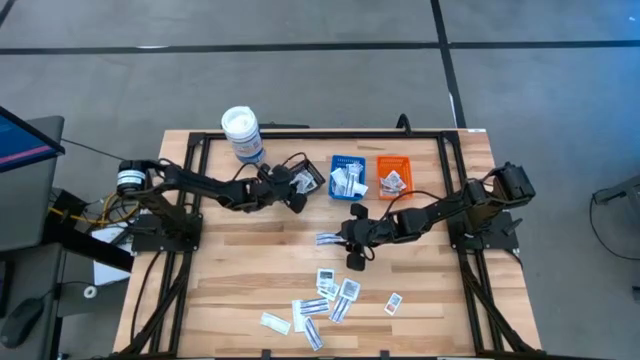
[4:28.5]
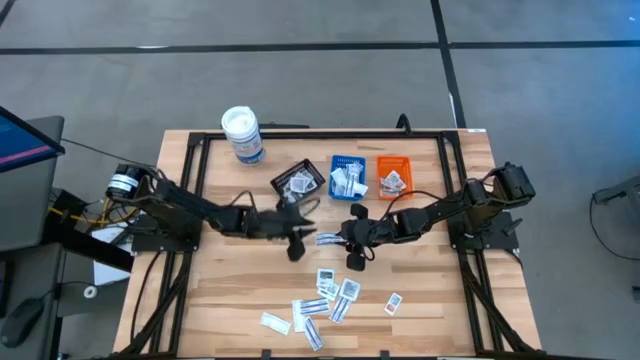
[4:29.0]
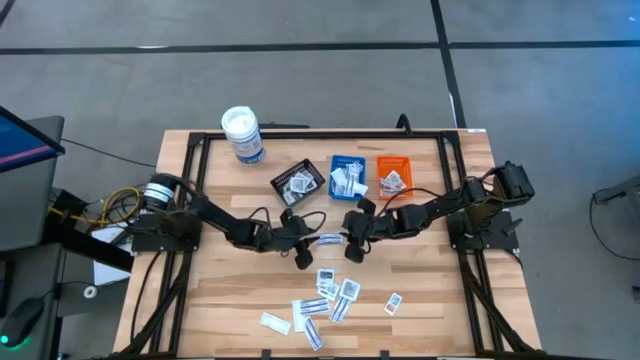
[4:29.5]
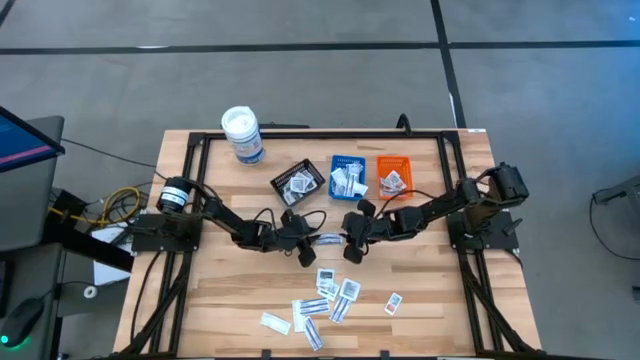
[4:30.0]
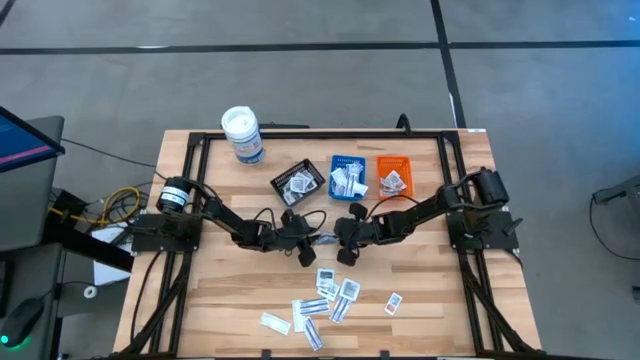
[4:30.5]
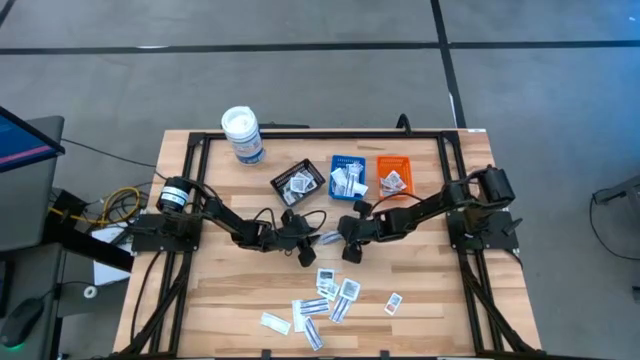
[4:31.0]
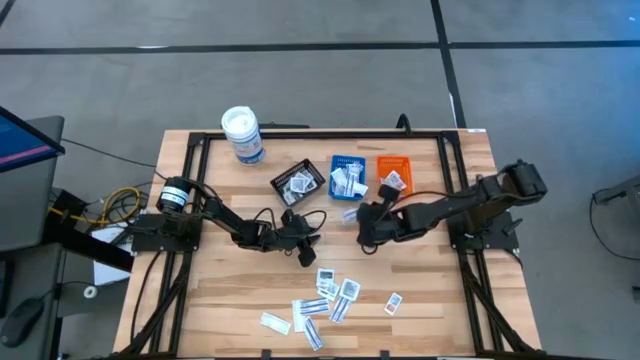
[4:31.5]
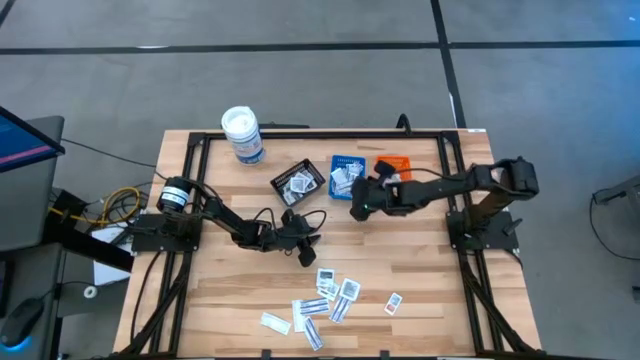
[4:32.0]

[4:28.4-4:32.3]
Task: Pick & Place First Aid Supplies
Put the blue bandage into the blue bin

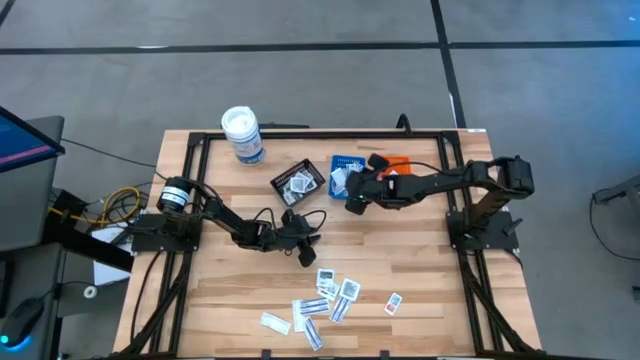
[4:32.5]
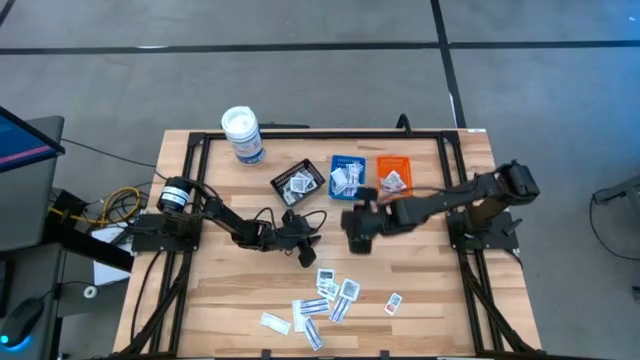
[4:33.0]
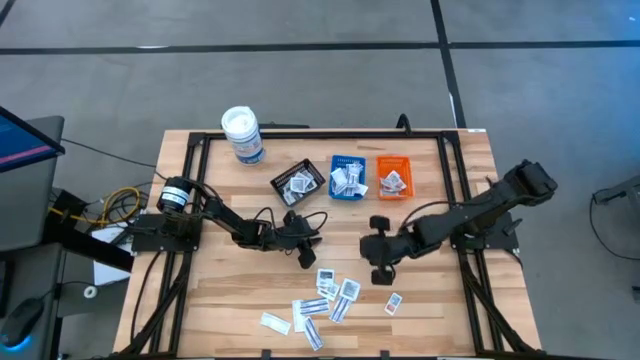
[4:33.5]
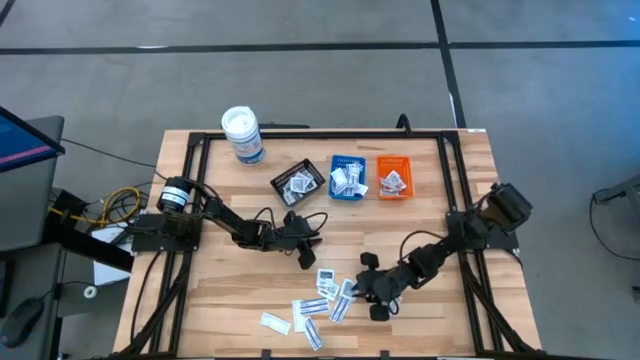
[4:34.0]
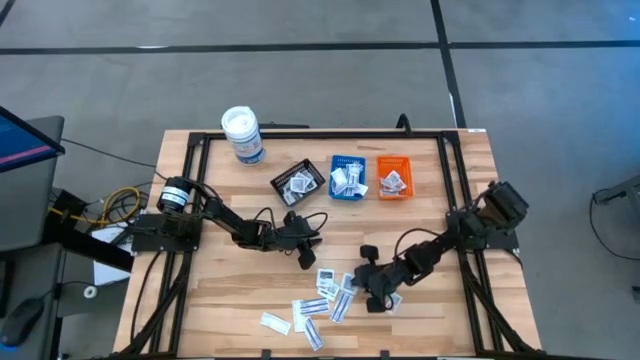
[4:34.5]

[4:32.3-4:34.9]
Put the black towelette pack into the black bin

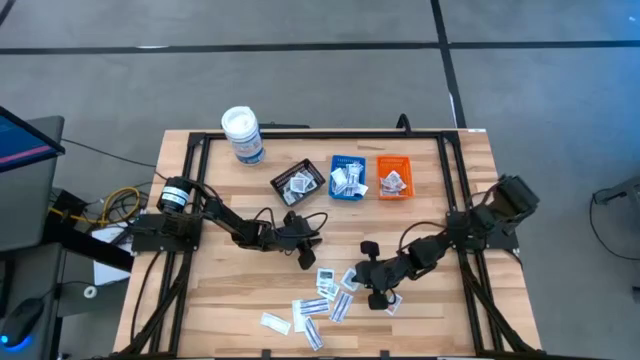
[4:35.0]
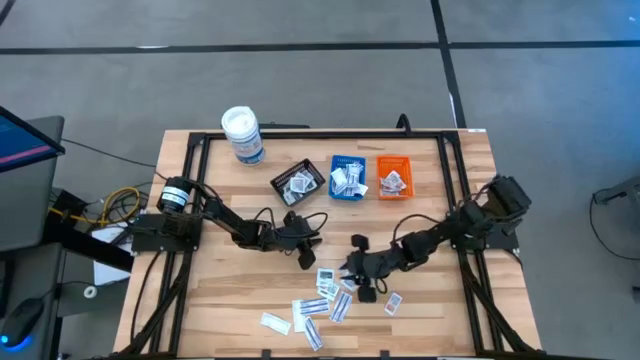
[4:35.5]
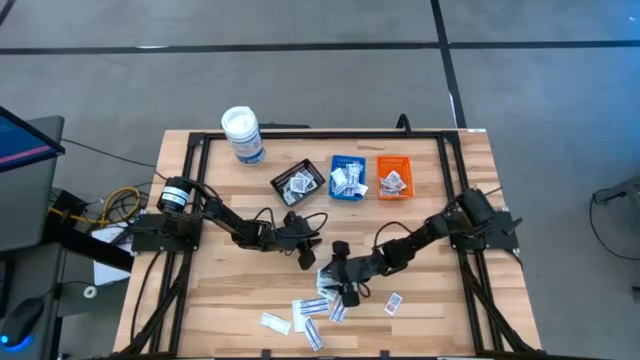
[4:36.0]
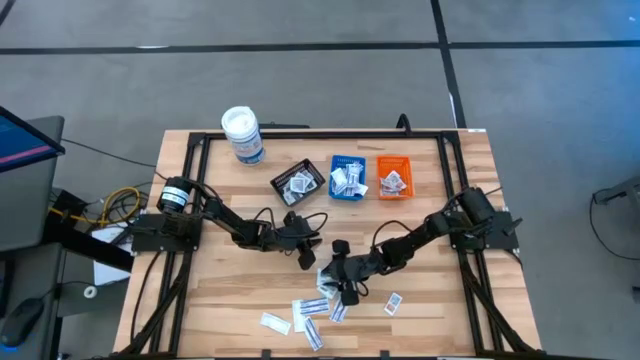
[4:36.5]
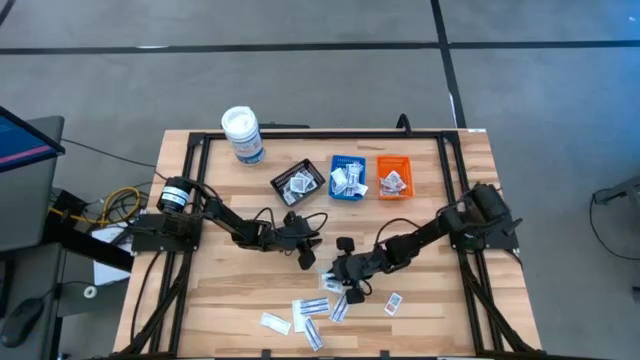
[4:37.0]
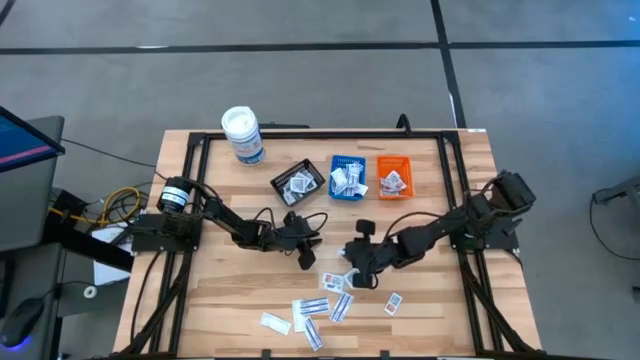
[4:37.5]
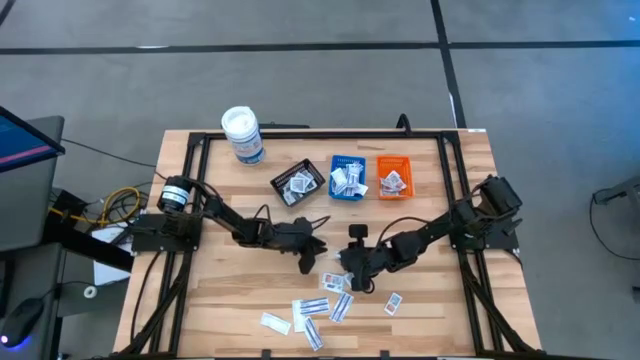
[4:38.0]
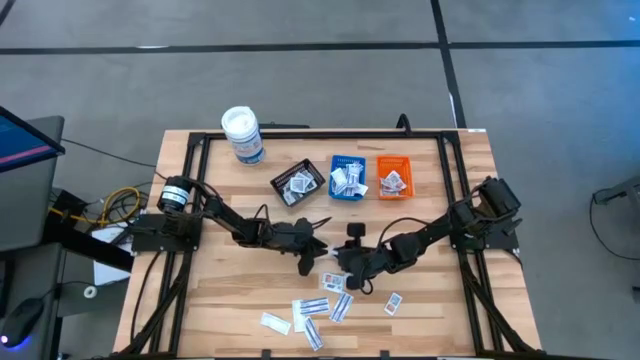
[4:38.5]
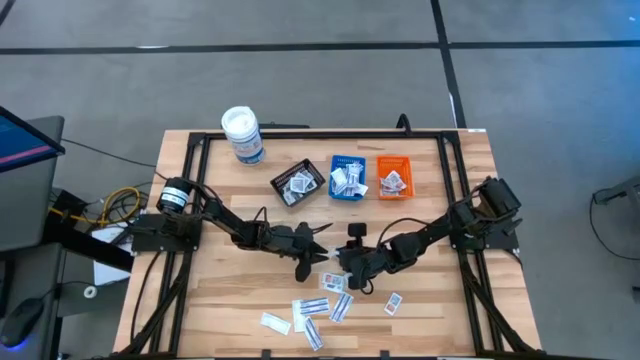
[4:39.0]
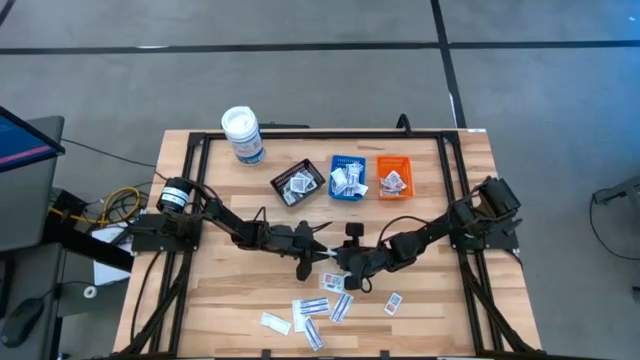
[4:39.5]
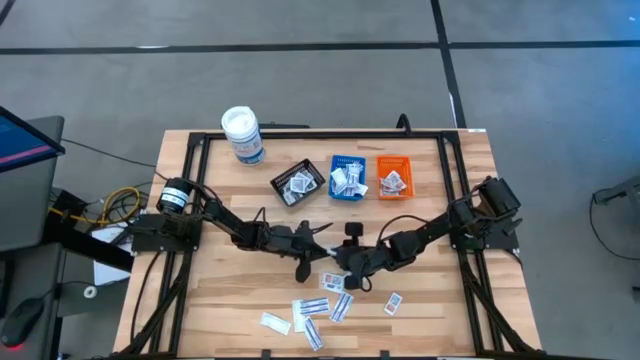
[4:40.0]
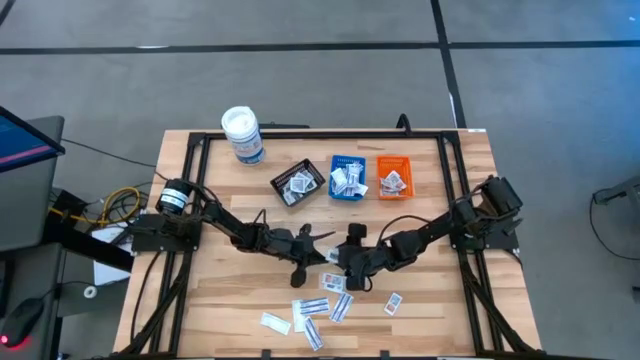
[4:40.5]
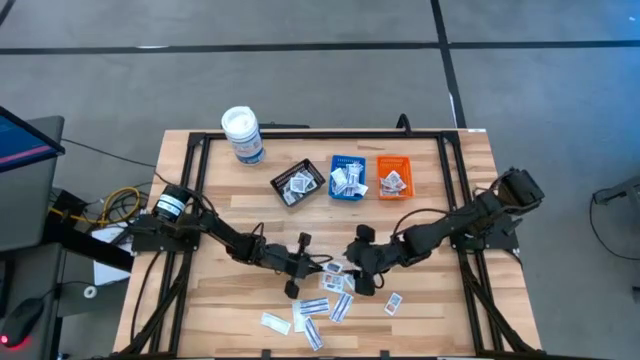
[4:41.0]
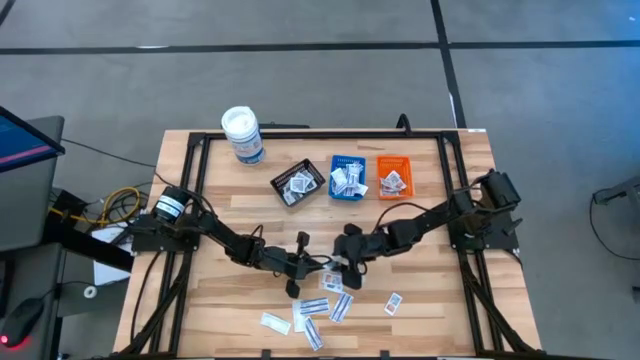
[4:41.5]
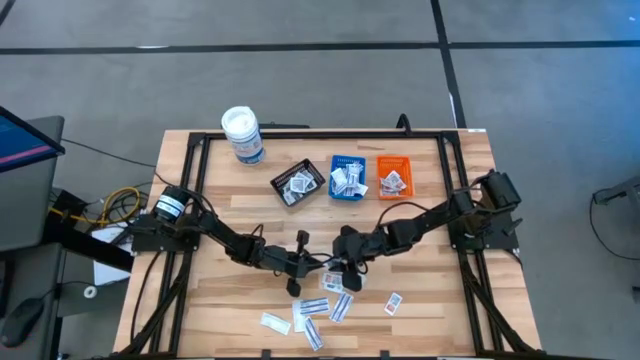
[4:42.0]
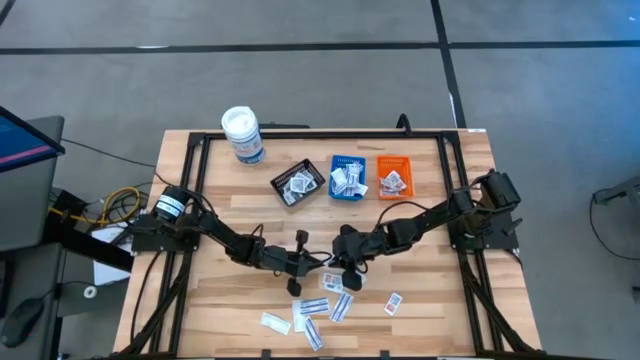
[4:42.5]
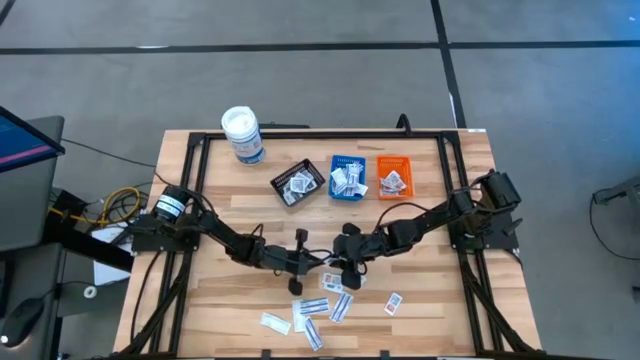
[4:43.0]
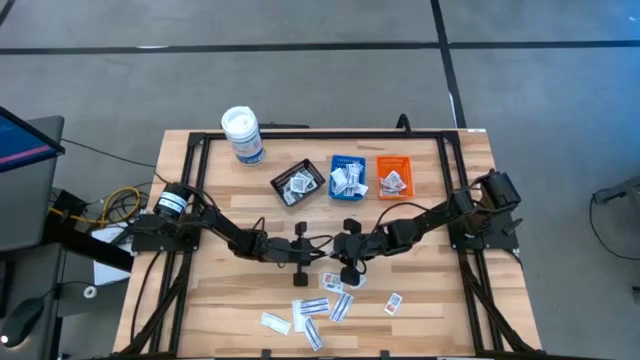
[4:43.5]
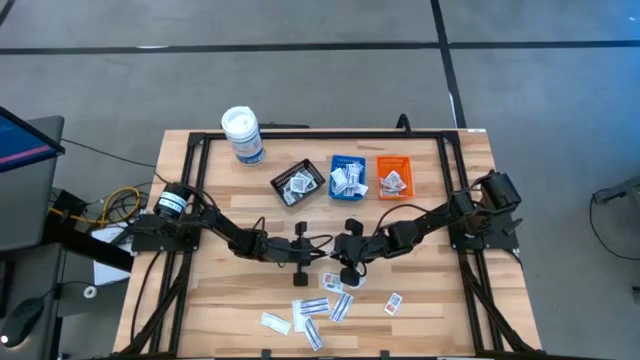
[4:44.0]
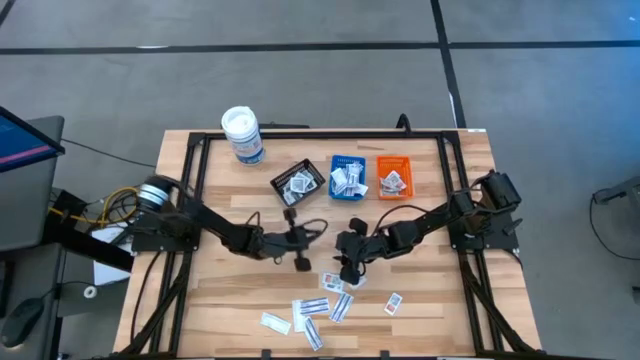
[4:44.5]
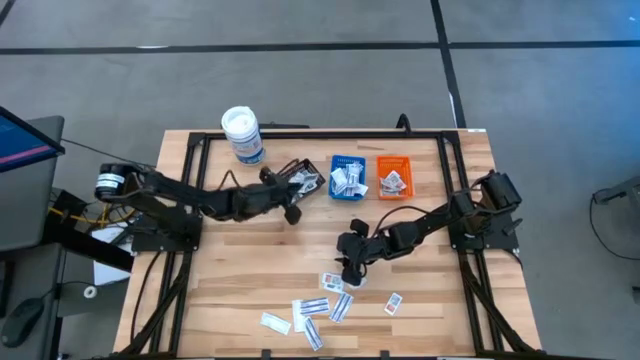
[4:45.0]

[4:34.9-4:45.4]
Put the black towelette pack into the black bin

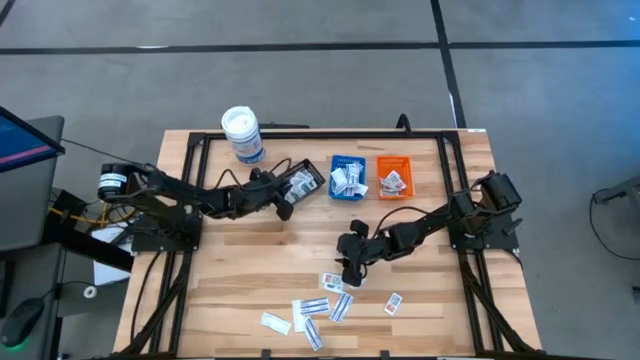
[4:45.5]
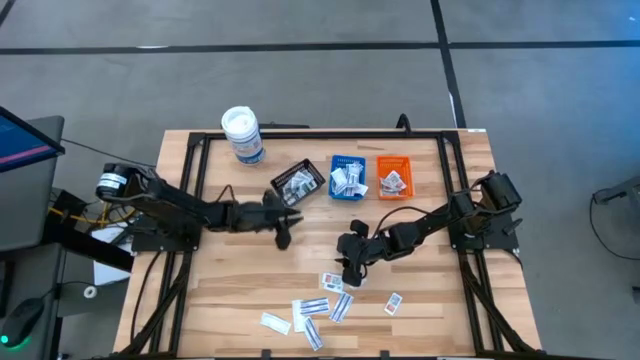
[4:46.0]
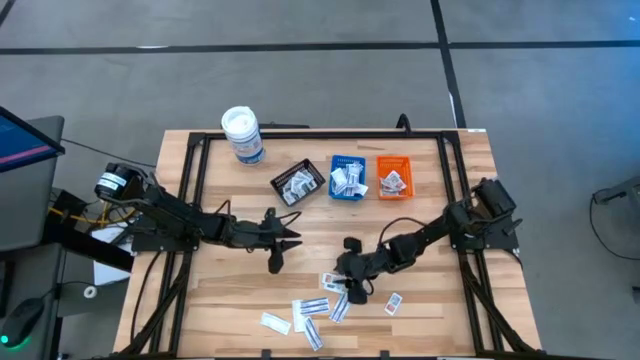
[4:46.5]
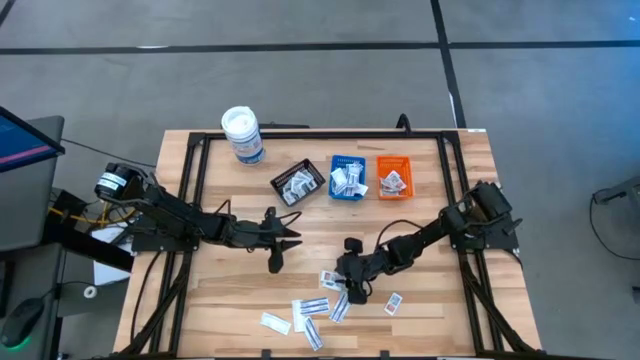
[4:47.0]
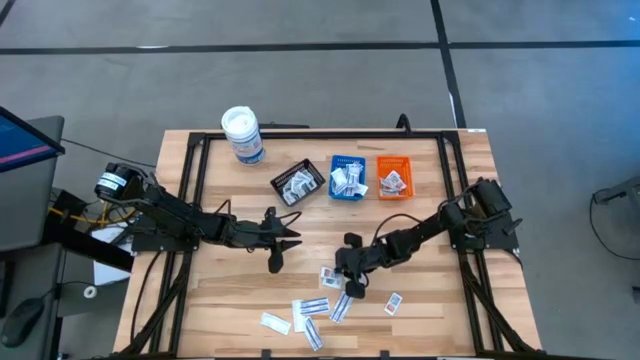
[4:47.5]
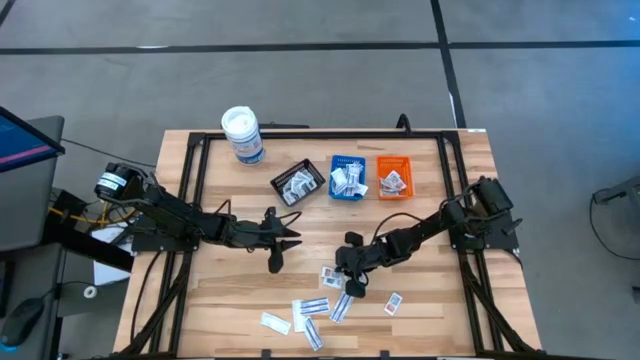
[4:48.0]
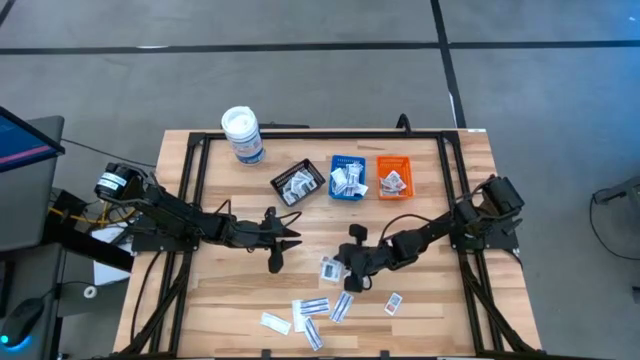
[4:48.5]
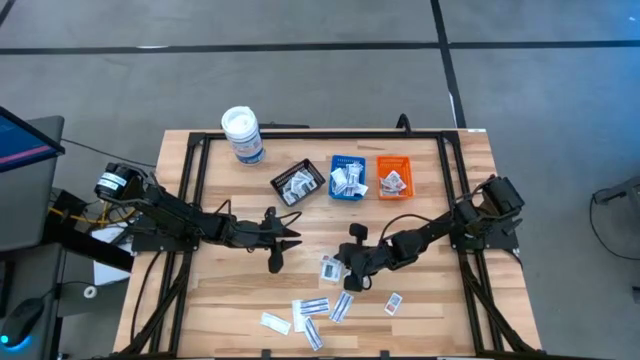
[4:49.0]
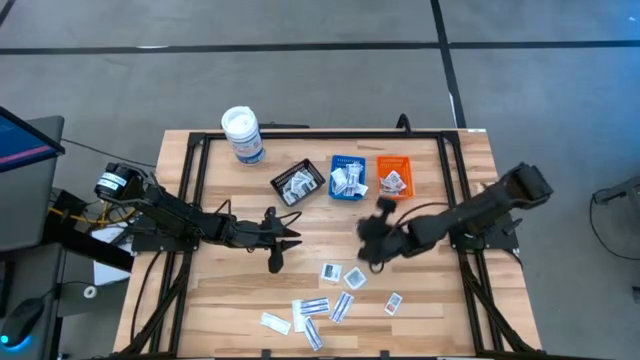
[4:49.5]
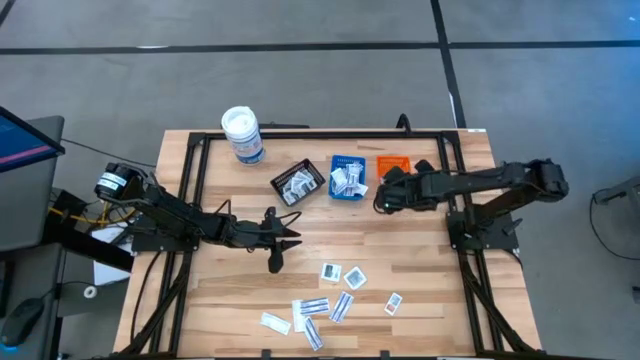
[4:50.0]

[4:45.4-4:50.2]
Put the orange ointment pack into the orange bin
